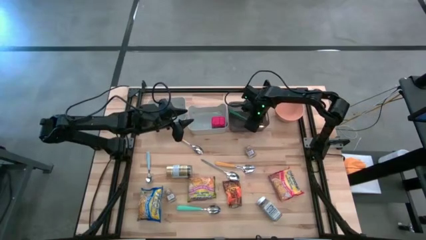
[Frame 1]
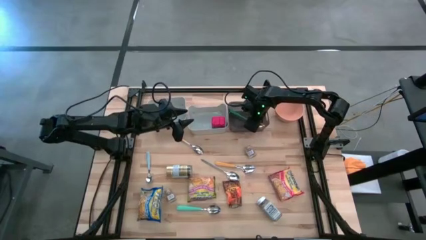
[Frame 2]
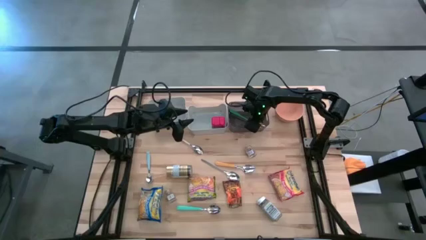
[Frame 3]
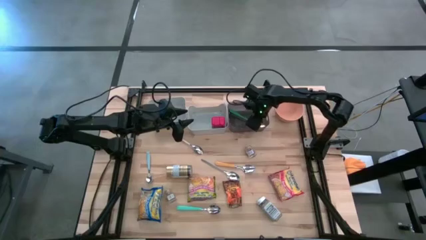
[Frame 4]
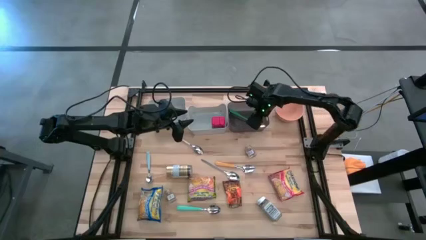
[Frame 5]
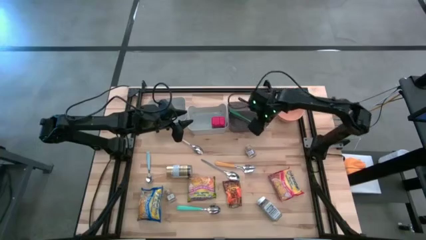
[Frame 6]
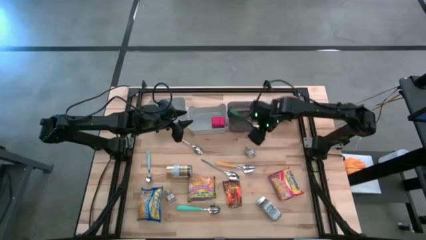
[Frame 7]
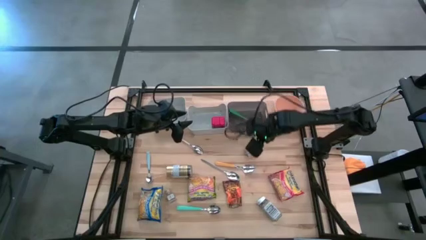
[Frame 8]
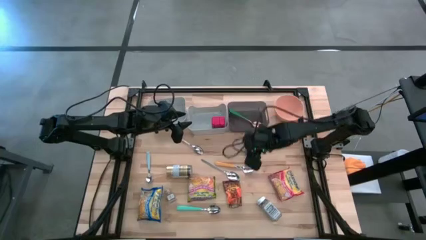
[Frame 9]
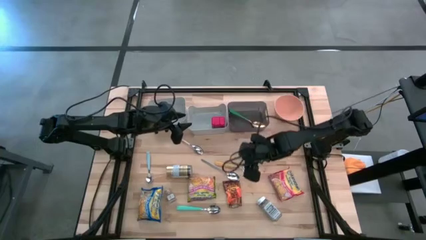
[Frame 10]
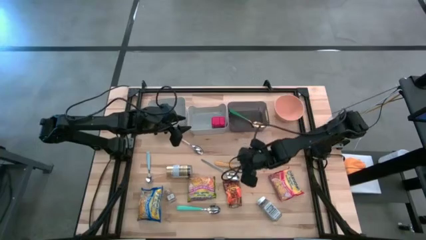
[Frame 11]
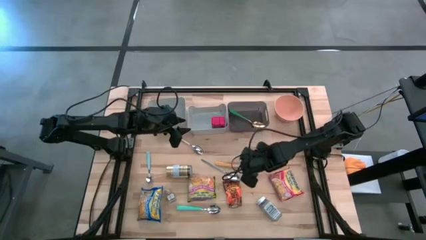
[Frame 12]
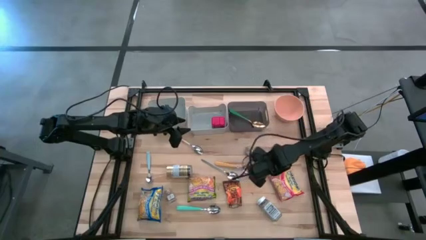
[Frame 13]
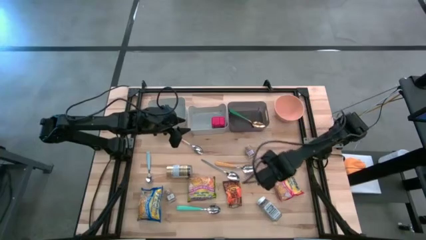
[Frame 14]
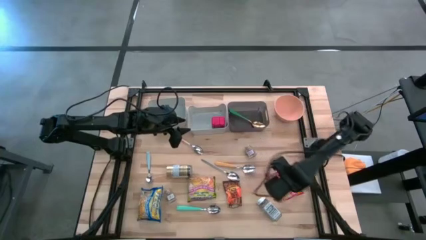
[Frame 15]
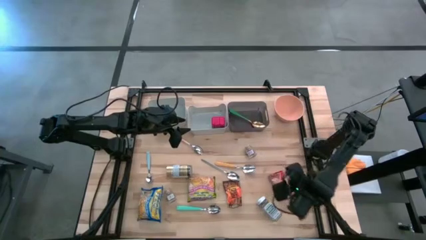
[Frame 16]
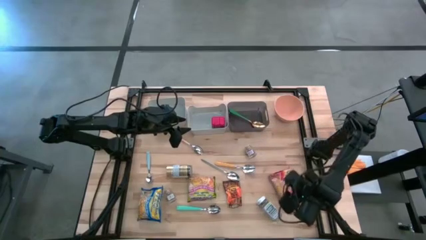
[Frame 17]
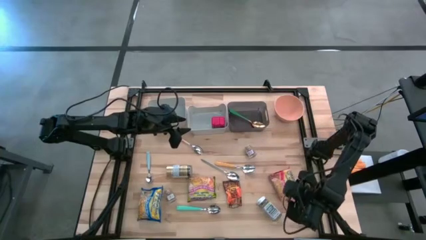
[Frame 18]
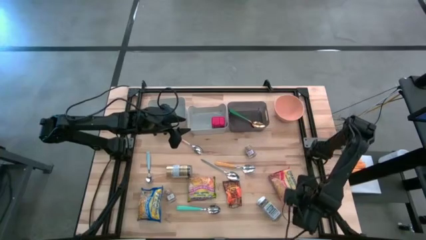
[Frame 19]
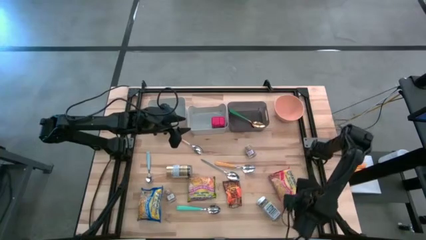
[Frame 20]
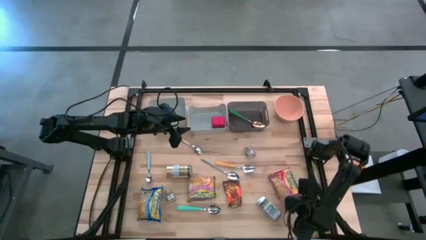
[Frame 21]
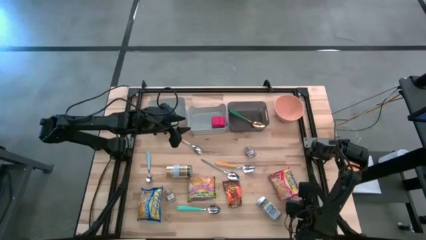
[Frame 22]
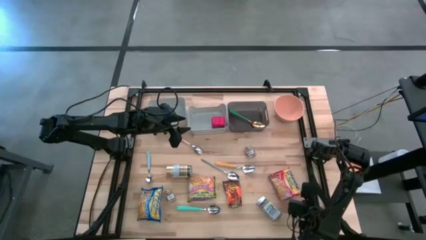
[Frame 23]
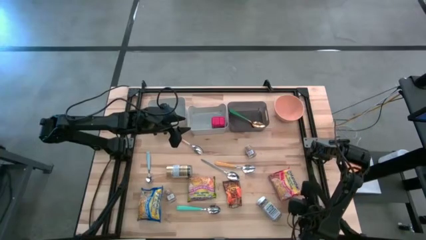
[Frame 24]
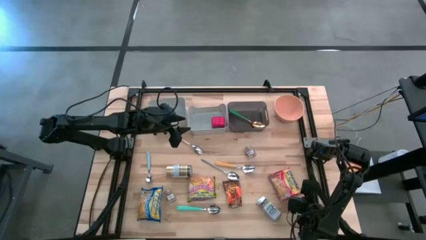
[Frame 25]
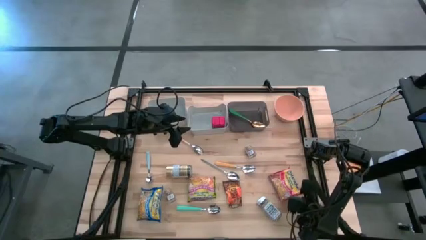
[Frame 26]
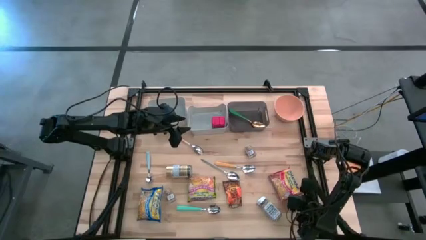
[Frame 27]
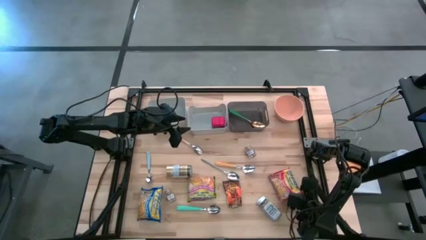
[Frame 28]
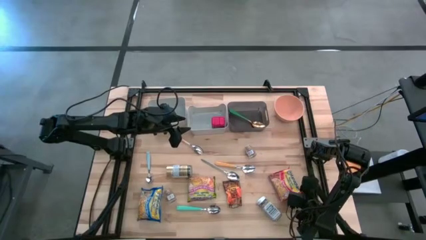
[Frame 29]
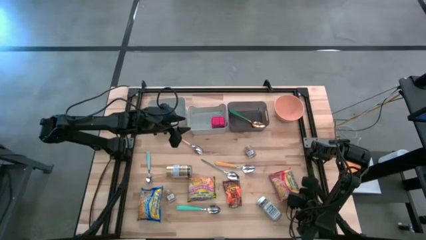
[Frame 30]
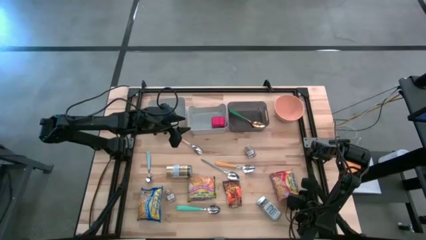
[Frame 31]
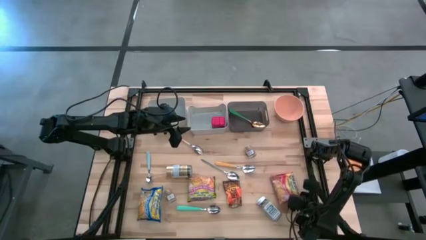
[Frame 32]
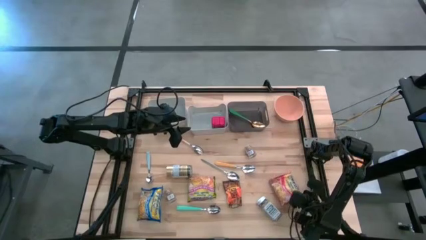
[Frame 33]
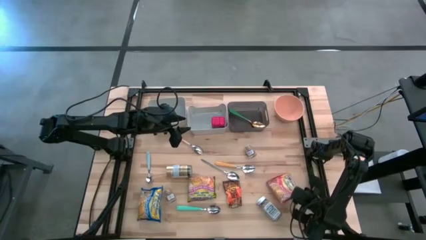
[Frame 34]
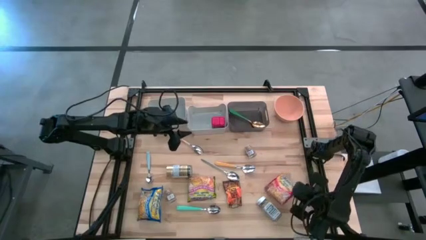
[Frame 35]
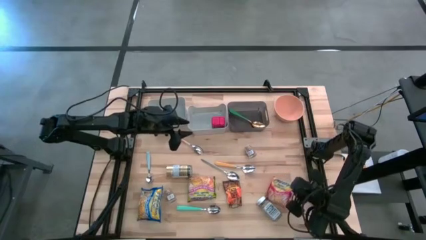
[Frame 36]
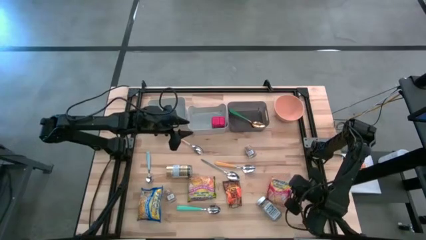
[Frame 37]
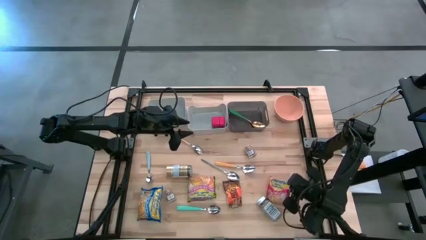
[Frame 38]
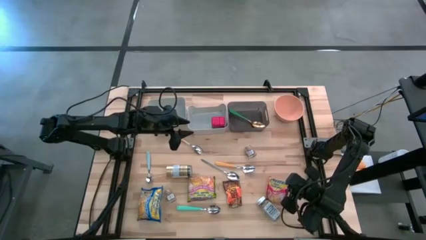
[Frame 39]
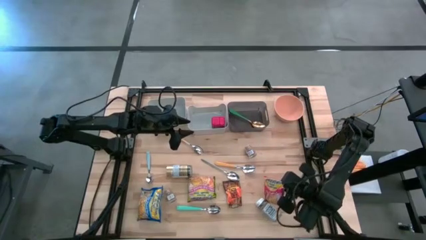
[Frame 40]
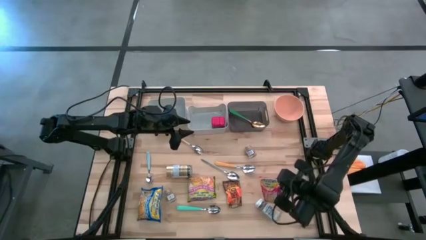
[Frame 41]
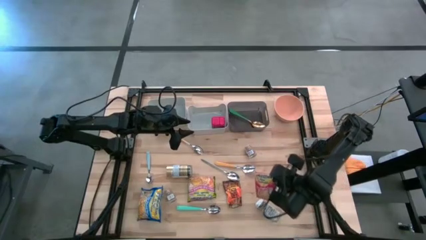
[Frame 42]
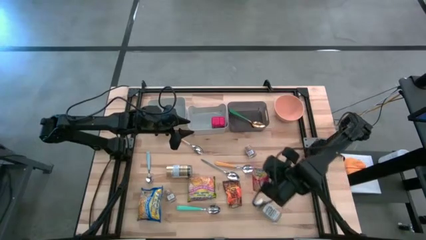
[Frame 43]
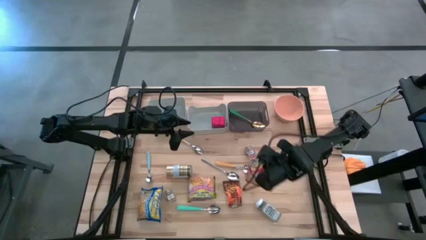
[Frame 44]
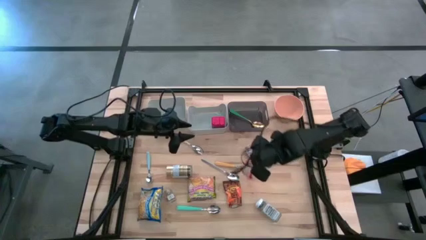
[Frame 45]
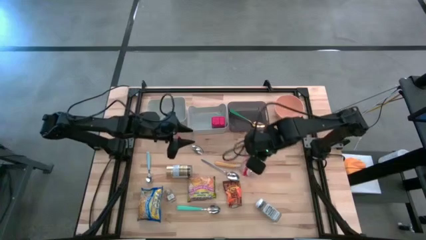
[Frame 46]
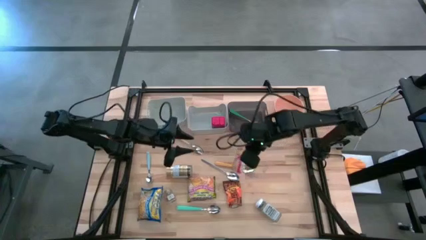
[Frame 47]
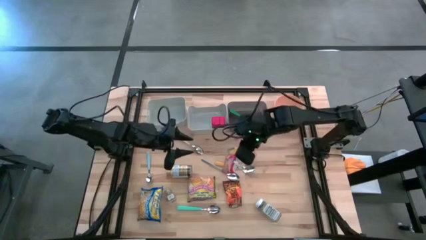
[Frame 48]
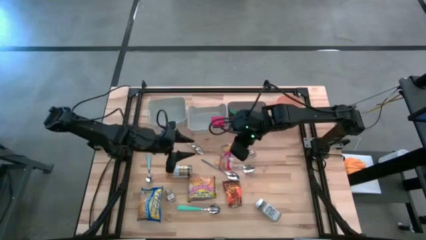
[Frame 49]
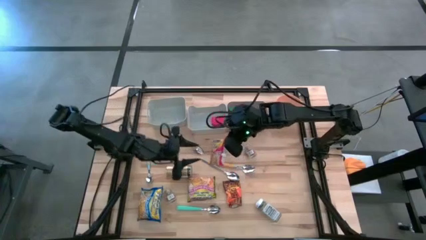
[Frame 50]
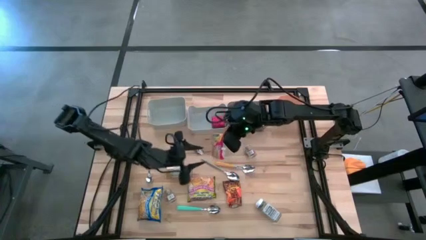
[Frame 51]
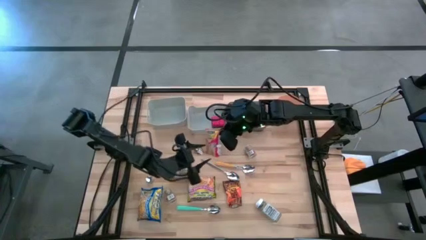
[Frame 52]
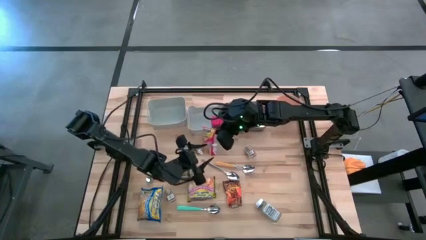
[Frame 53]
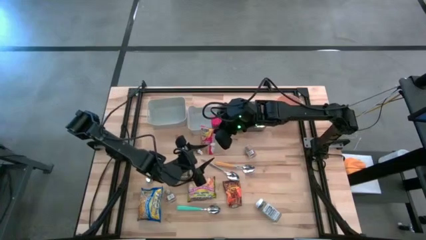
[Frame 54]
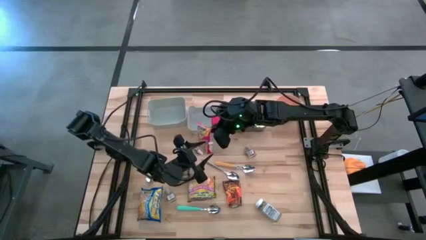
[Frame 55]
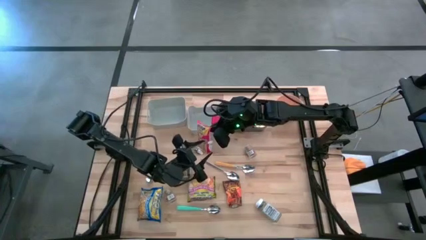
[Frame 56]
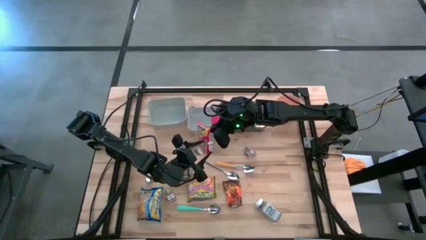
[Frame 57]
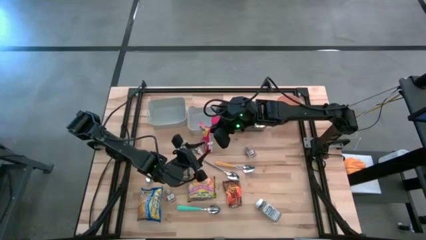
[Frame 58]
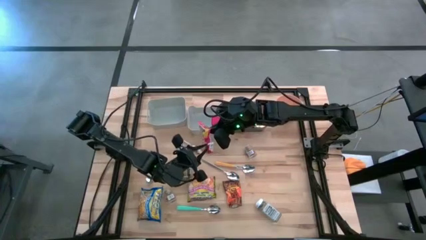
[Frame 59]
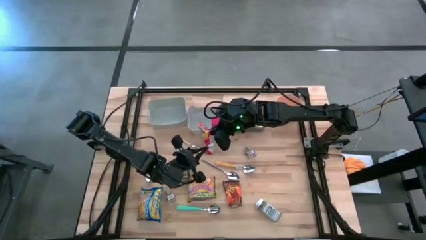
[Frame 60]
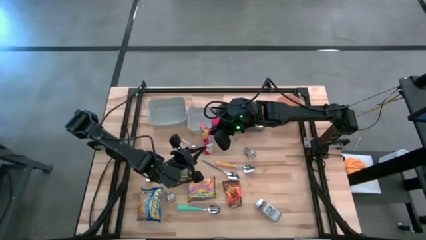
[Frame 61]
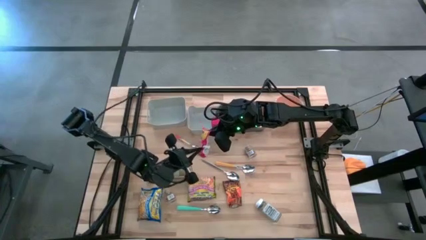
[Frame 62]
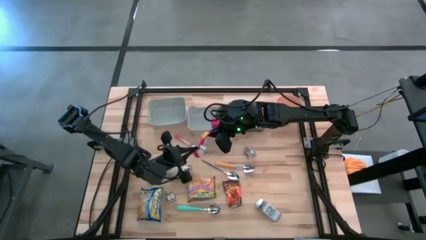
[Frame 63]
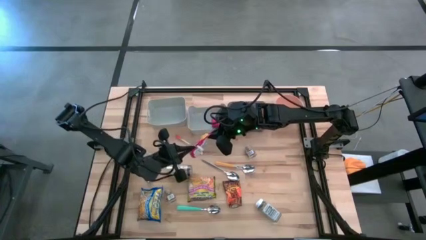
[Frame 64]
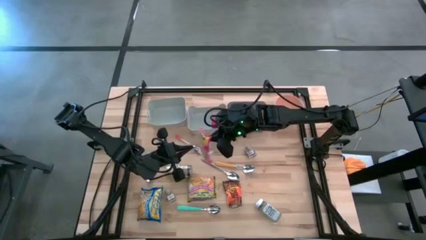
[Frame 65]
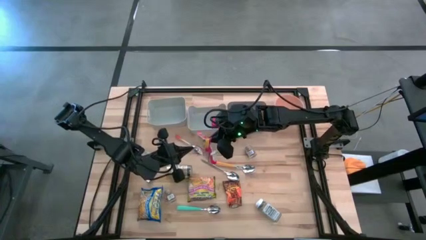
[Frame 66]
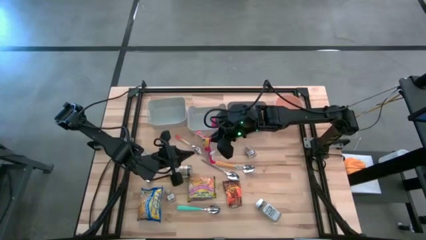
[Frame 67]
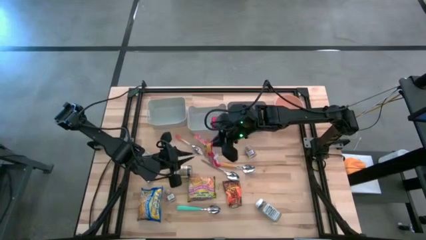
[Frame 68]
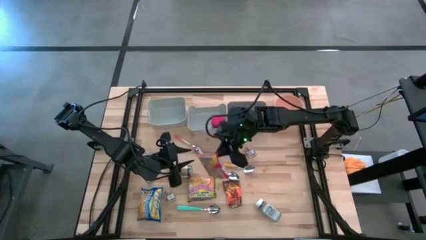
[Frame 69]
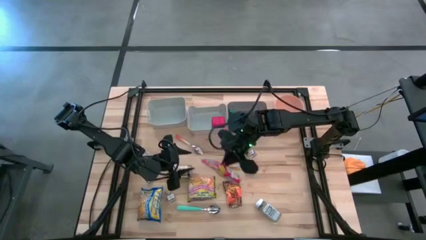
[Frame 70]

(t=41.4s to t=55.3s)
Put the red noodle pack into the left gray bin
